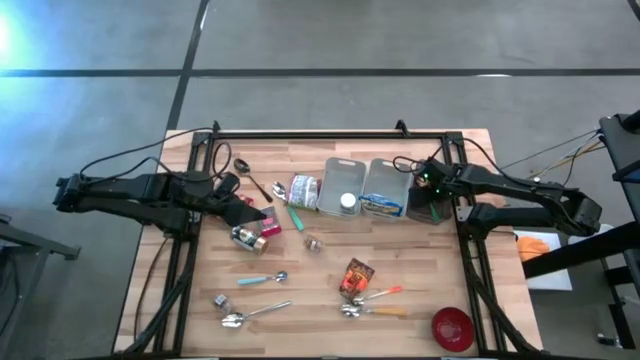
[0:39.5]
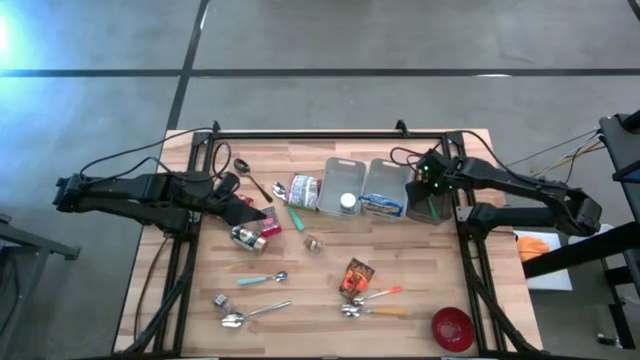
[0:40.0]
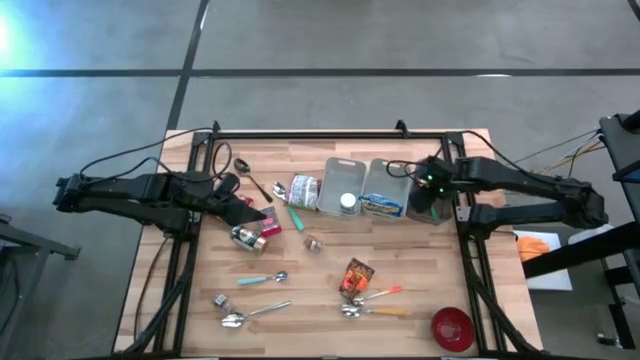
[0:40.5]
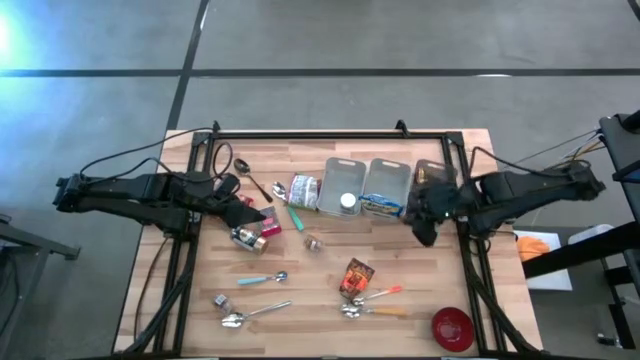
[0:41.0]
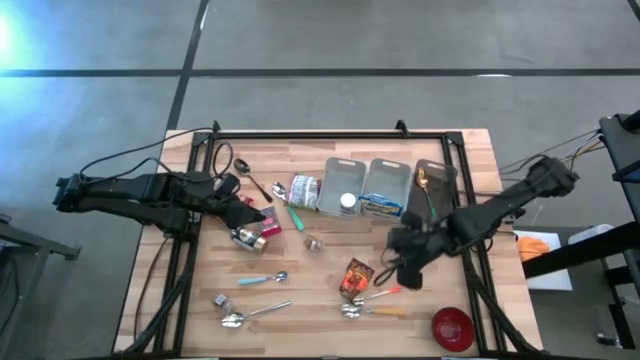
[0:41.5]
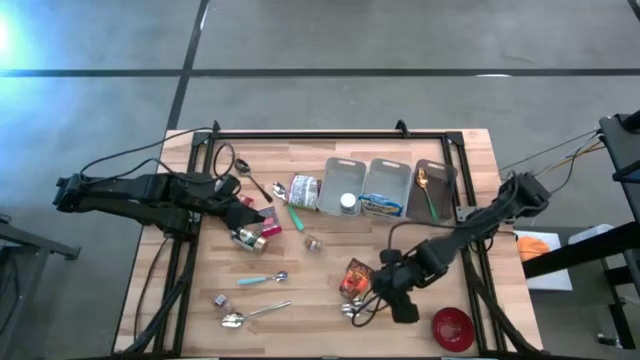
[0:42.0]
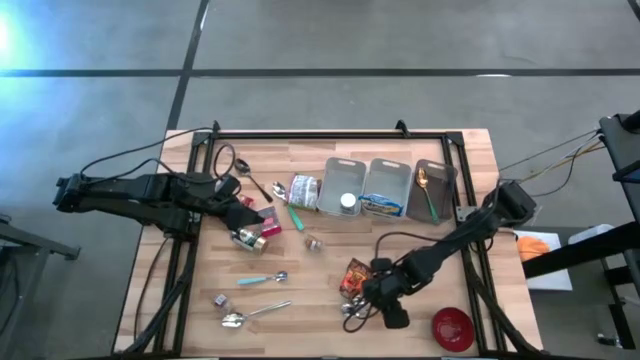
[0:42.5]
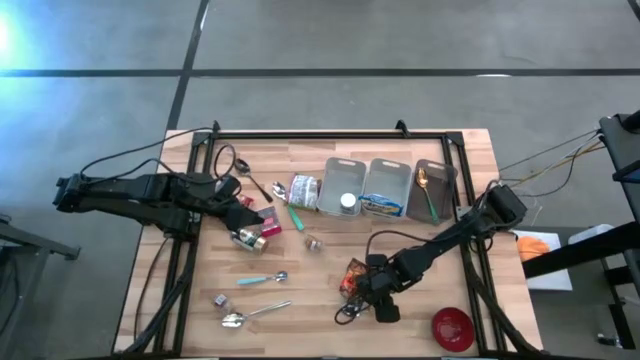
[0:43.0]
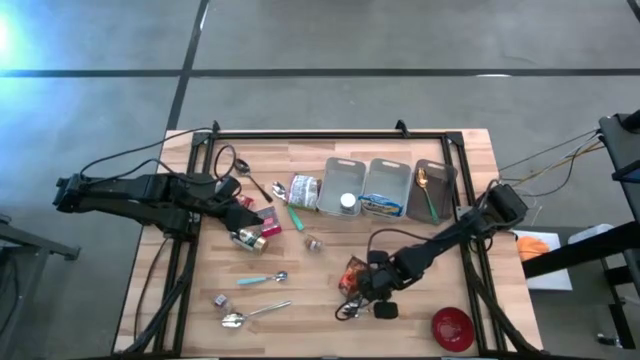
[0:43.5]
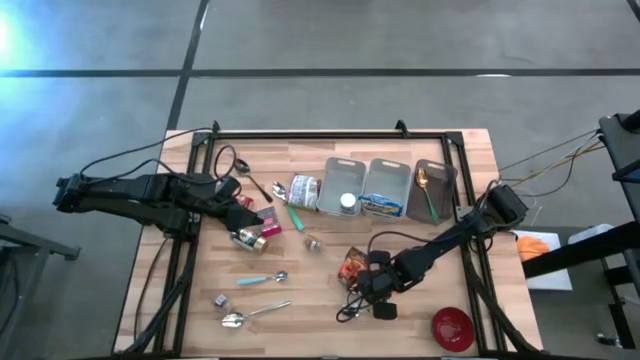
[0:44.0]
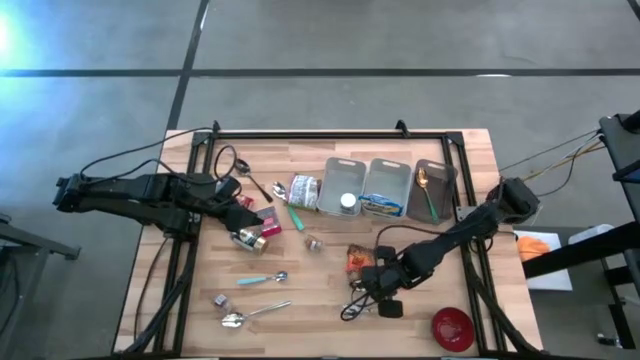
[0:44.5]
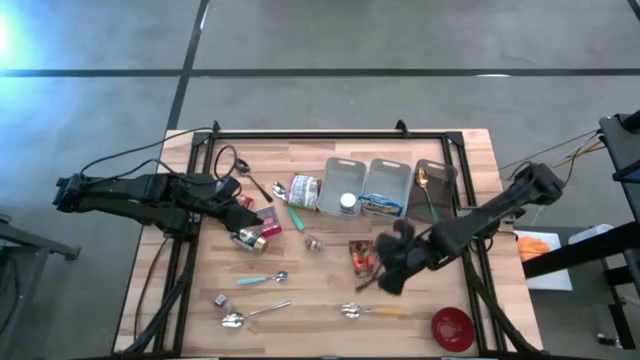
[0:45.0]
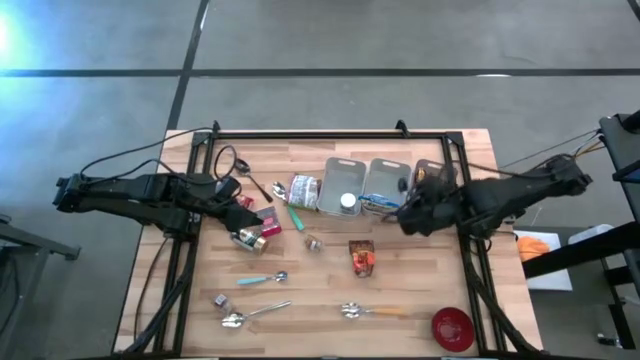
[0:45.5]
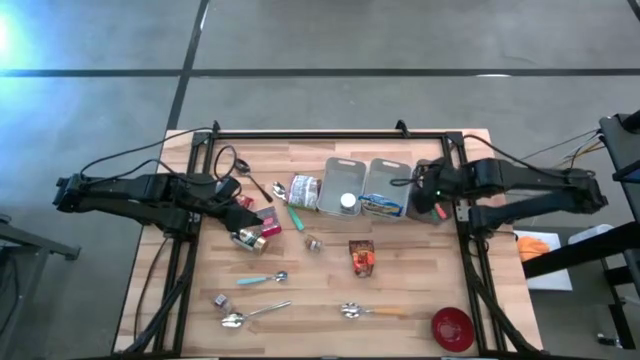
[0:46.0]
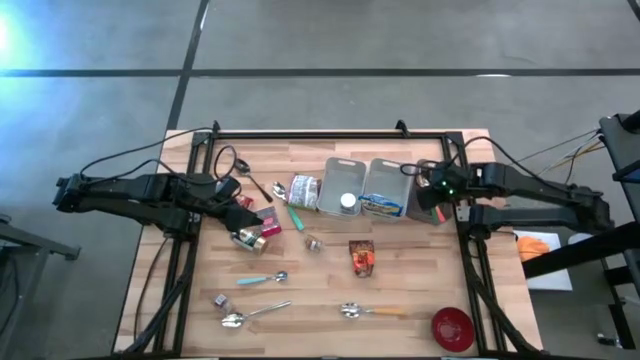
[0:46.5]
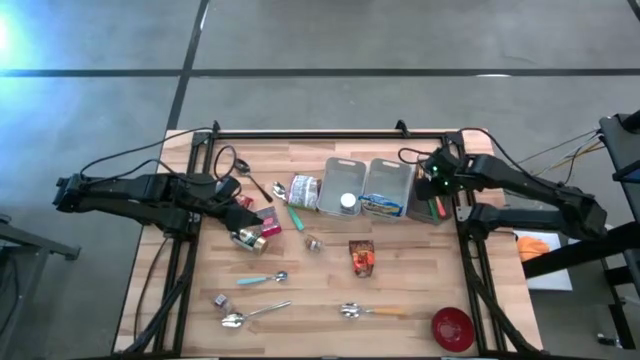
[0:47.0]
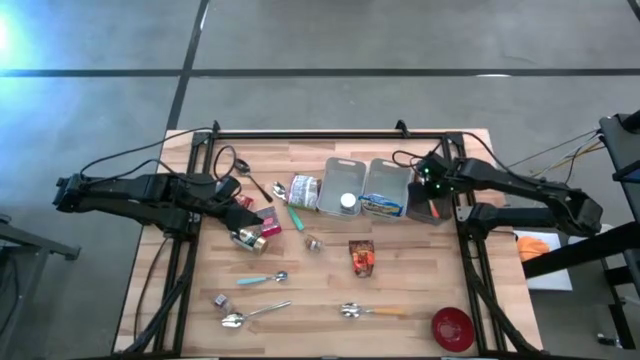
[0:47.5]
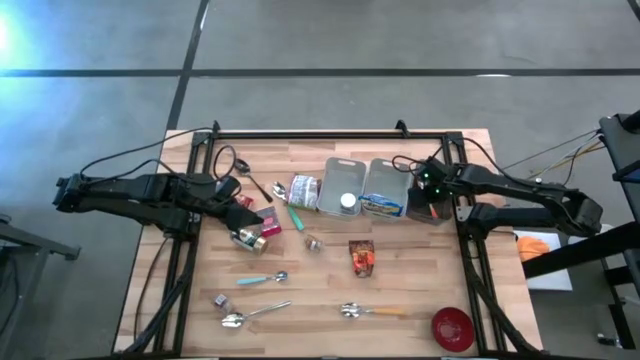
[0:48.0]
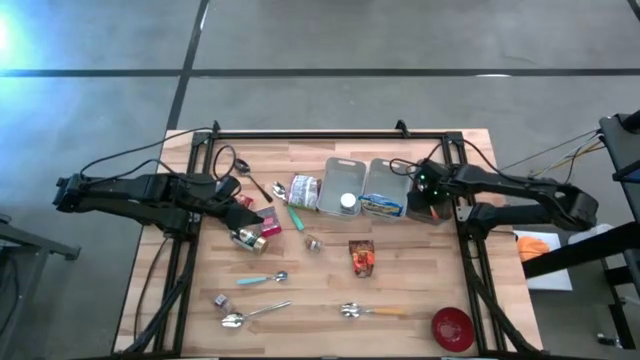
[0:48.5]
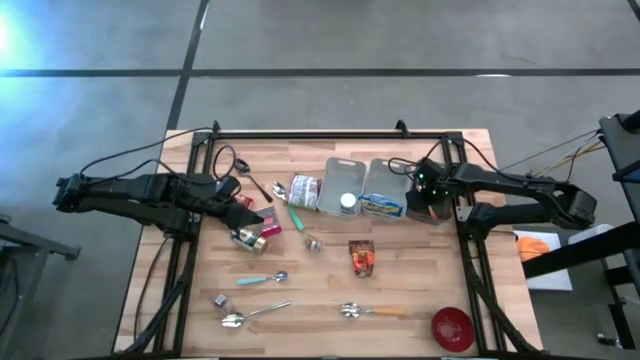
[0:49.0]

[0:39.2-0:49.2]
Put the orange spoon into the black bin
